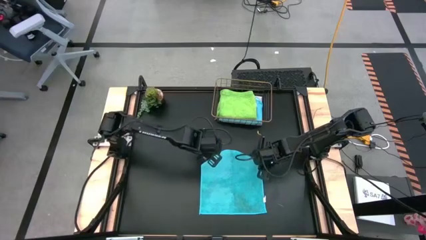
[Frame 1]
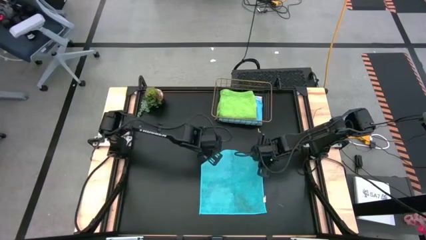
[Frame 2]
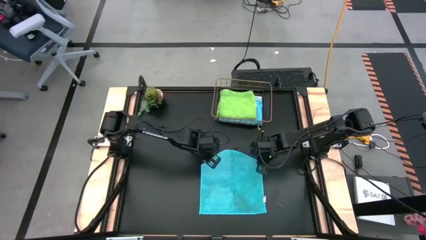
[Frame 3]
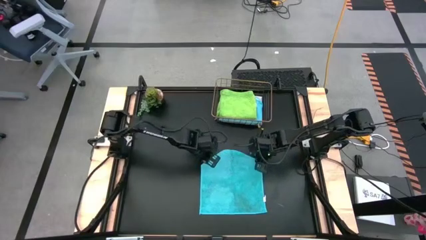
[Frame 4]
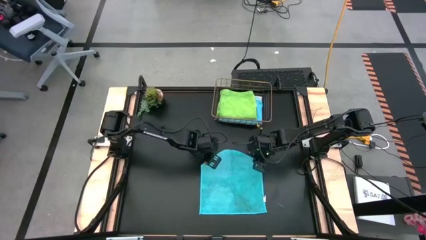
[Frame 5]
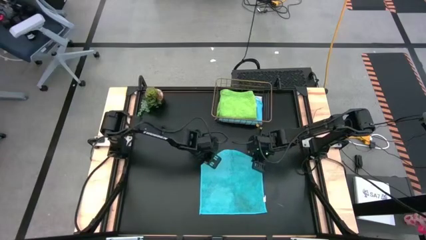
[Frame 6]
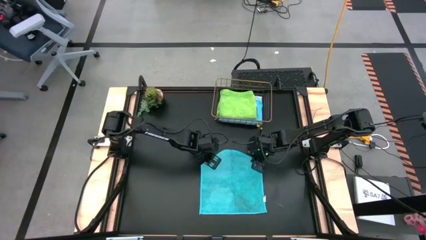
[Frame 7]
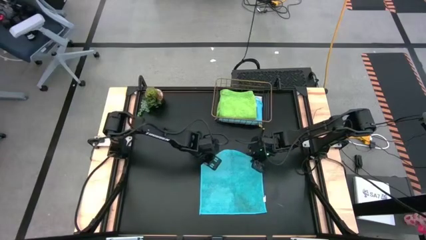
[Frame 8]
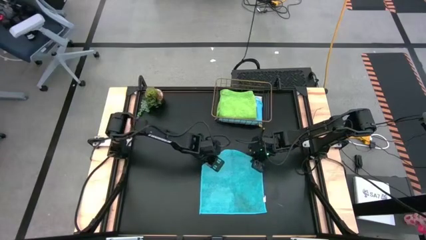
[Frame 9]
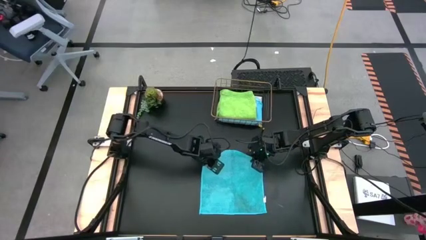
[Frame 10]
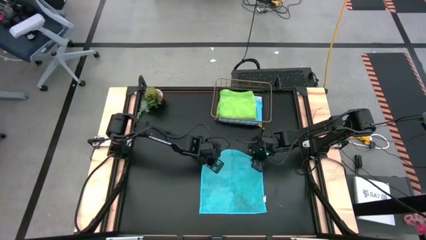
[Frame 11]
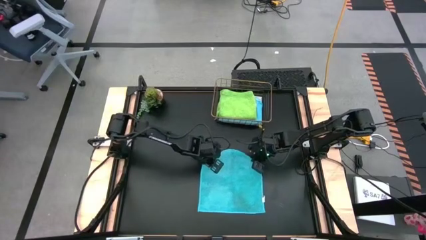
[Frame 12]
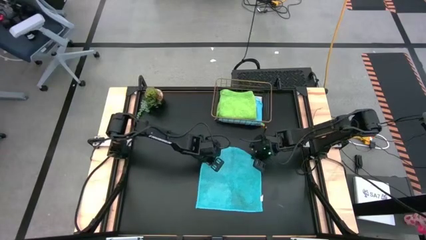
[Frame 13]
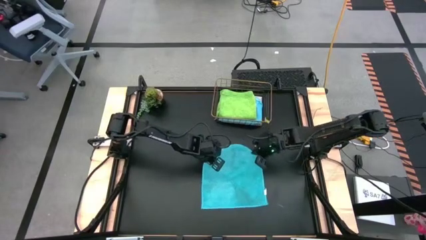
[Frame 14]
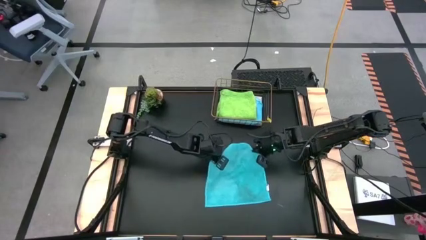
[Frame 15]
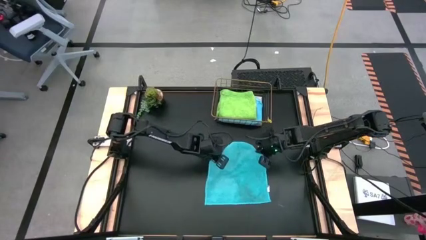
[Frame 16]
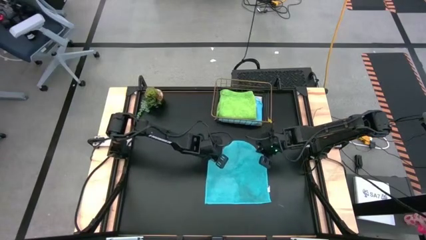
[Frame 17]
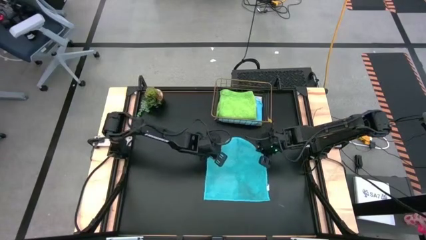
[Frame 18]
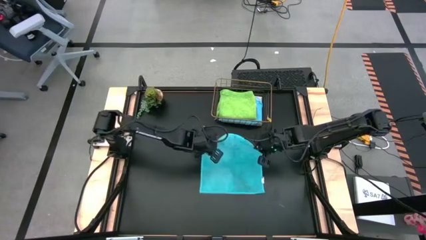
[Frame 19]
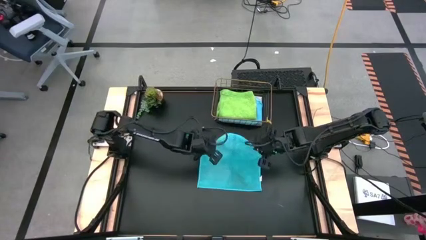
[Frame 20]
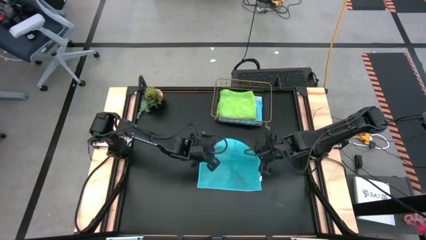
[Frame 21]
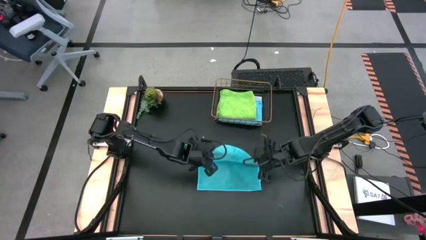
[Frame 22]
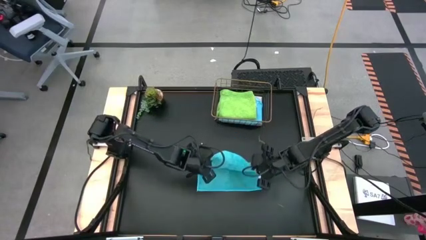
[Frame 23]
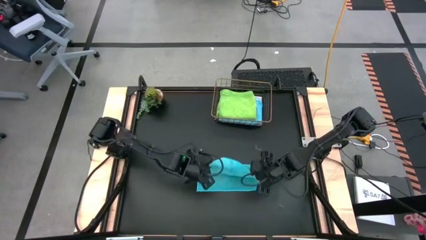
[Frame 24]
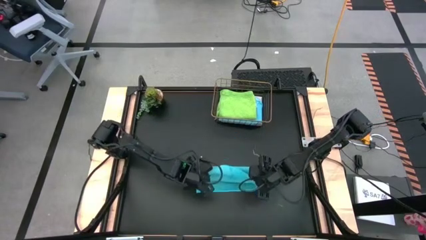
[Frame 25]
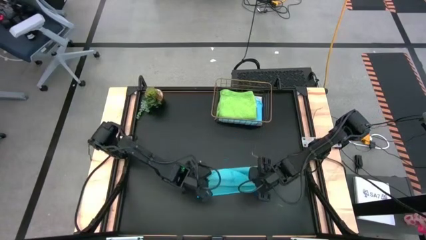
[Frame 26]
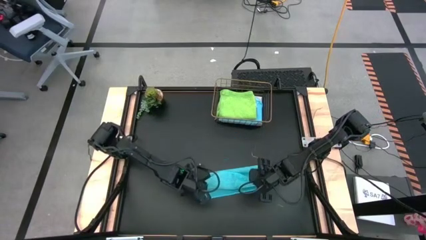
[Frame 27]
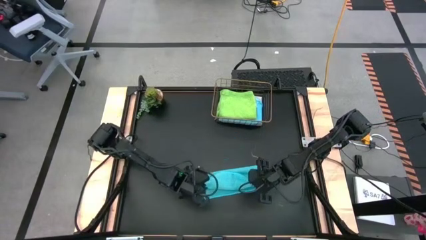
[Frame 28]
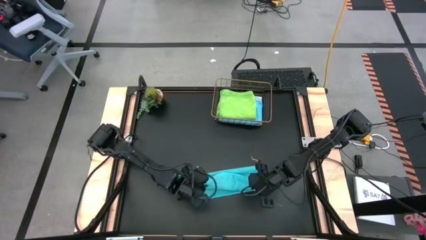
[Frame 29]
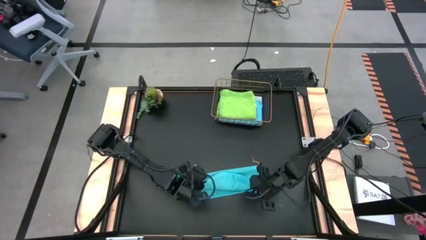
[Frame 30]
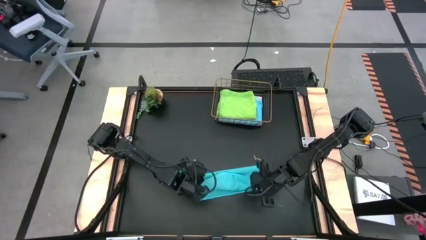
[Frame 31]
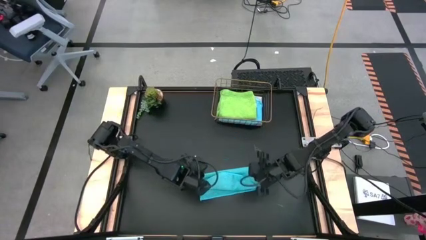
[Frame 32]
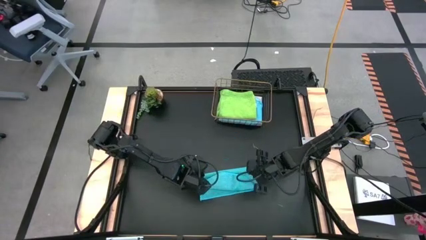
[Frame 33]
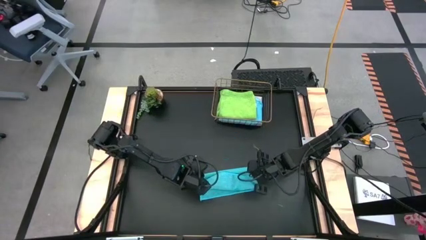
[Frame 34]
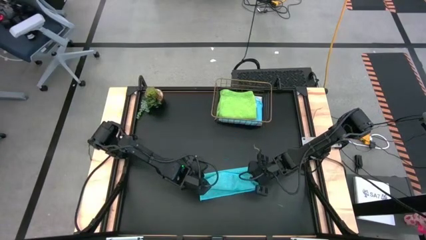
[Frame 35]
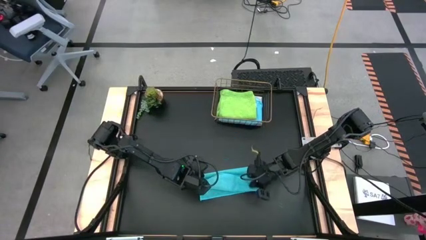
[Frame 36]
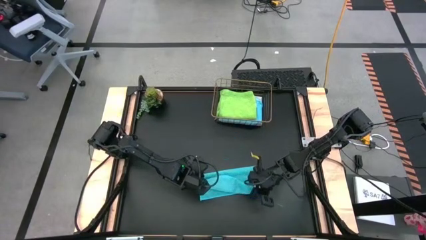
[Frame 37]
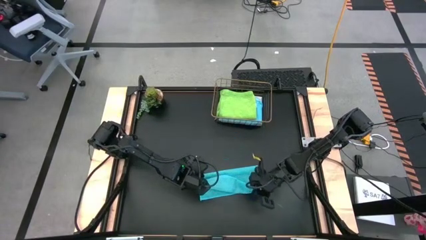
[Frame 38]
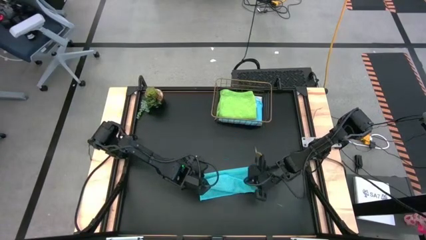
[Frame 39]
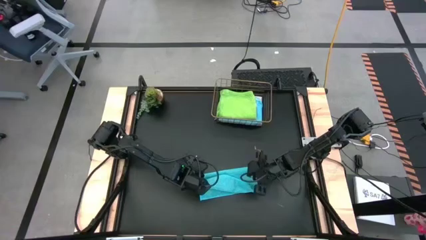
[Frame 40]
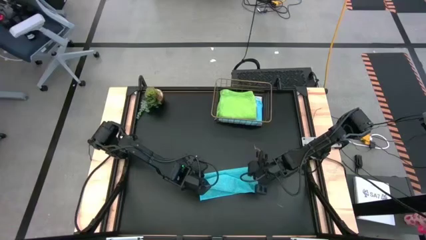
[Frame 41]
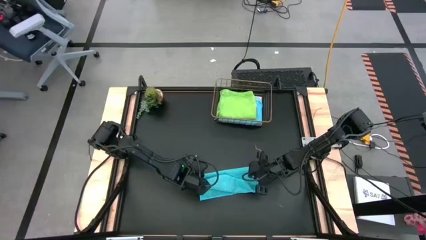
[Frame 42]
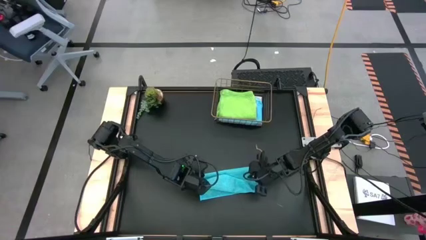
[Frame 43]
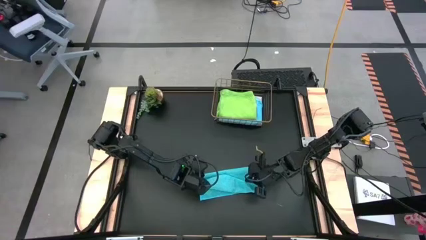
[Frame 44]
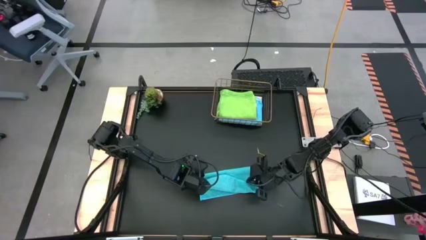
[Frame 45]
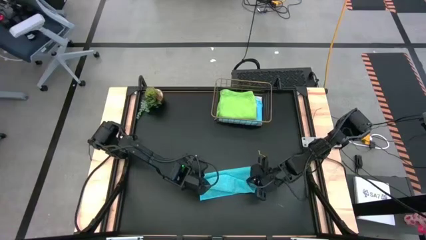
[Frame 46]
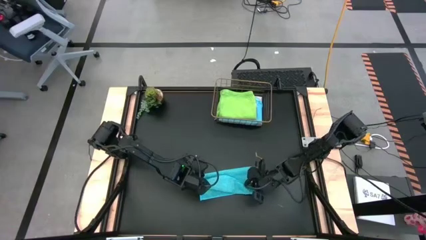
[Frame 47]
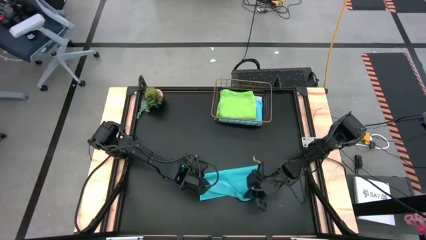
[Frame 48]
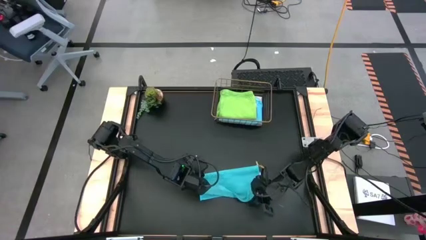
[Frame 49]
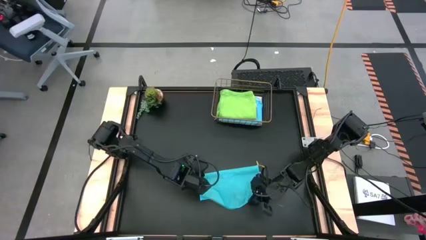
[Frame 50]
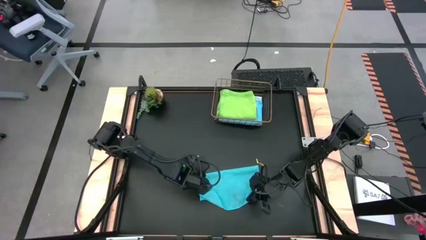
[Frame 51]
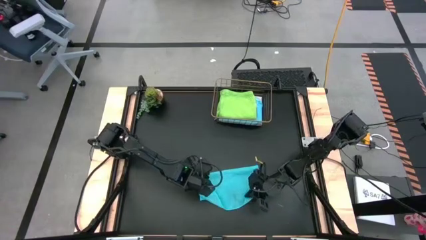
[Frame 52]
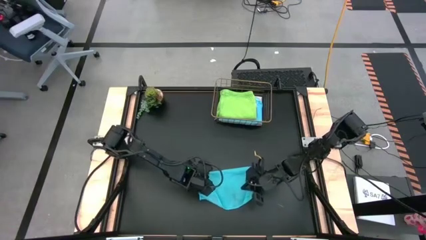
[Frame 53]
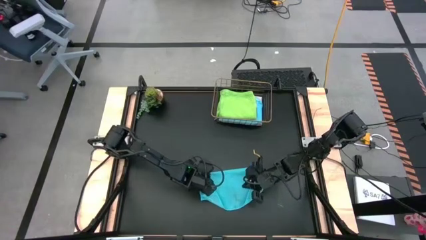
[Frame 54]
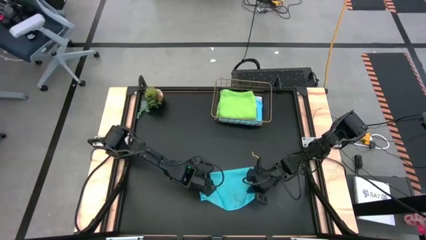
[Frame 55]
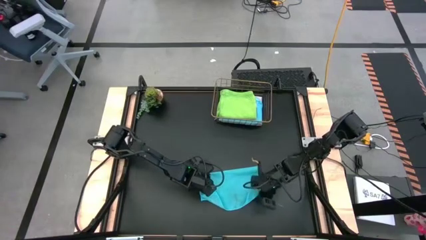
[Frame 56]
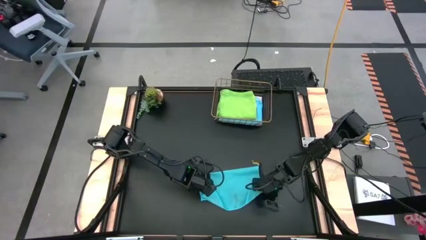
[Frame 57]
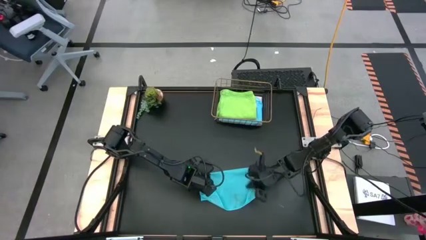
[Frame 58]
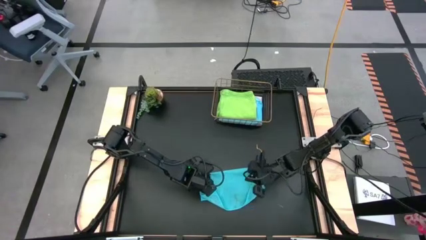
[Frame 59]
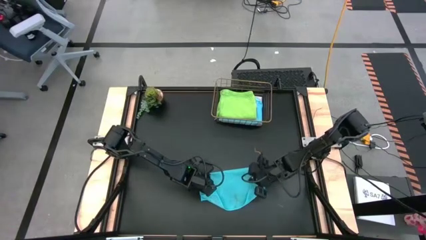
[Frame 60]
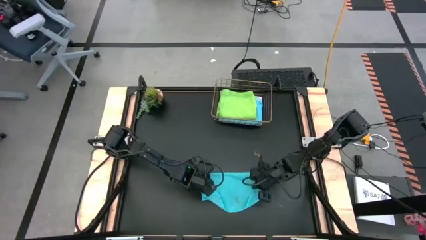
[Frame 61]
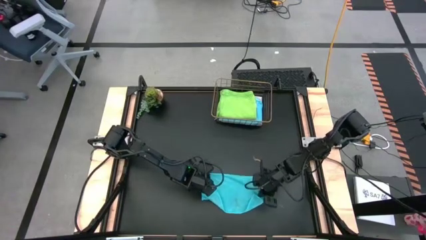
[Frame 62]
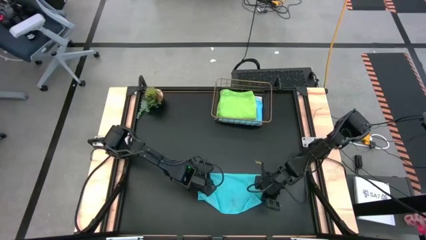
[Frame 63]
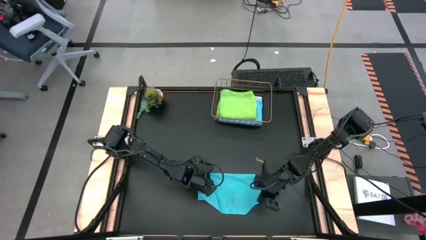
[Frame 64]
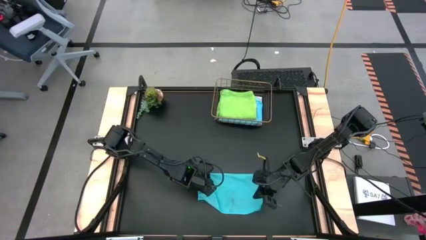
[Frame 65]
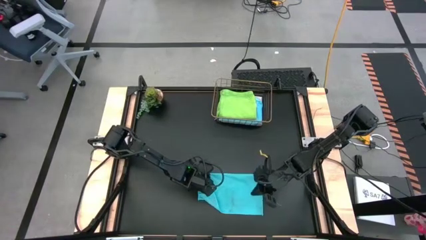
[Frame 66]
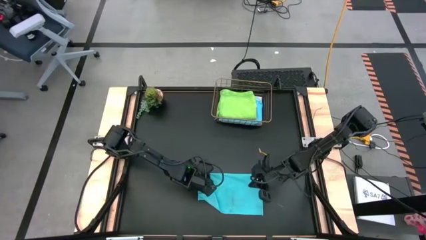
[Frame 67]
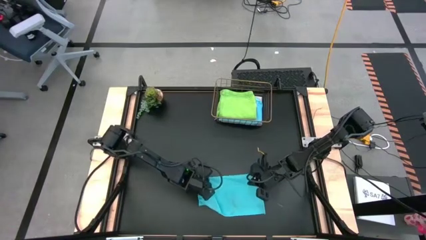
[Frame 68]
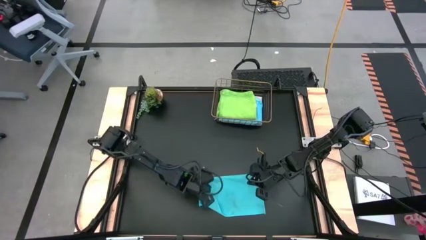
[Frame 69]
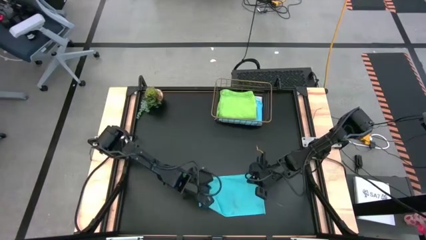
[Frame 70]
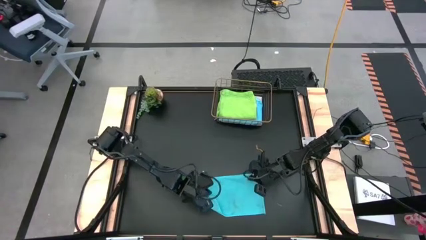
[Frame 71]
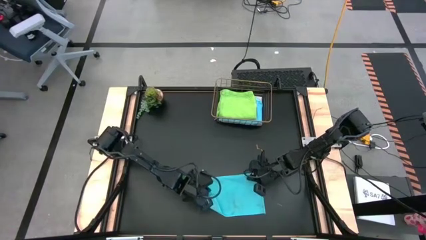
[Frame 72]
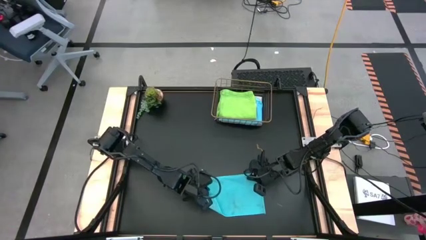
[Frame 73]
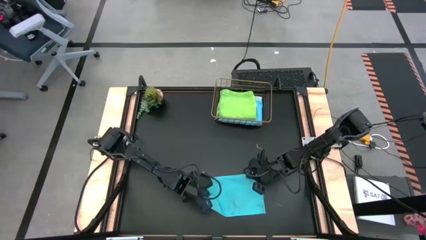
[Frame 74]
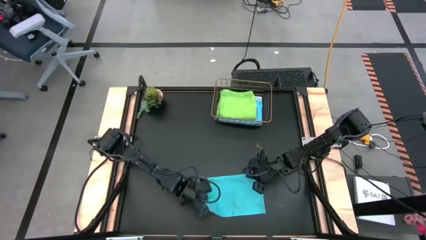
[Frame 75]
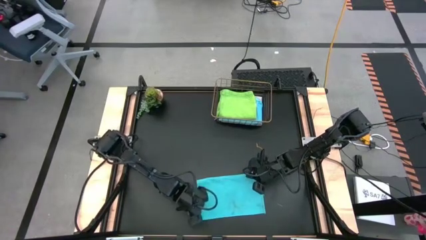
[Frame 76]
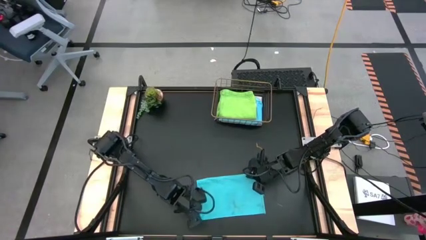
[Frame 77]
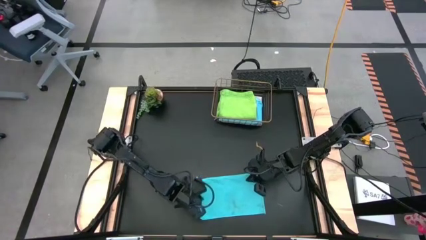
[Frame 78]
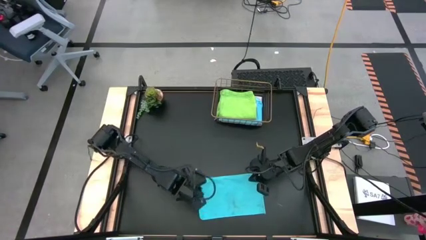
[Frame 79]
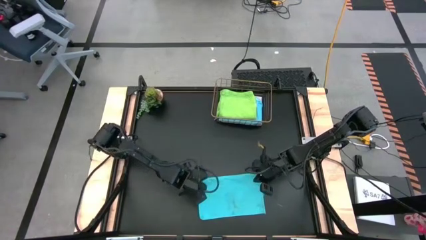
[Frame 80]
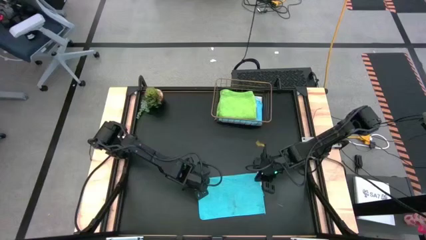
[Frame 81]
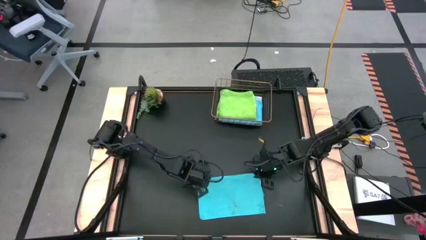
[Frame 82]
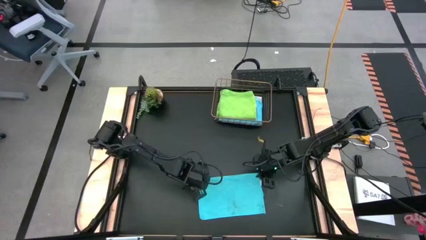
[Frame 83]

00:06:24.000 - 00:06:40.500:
Task: Fold microfiber towels
Fold the blue towel
